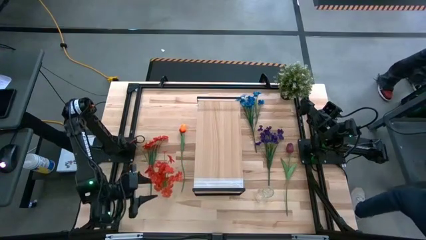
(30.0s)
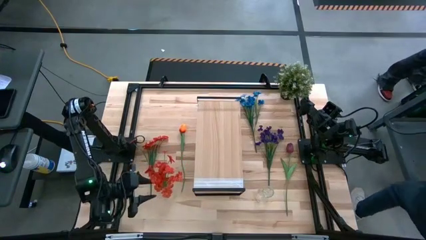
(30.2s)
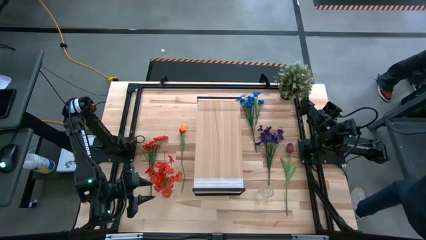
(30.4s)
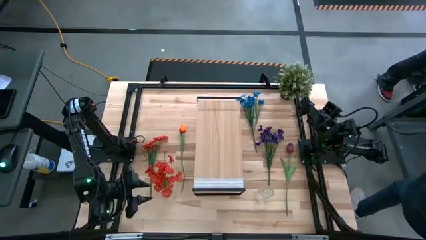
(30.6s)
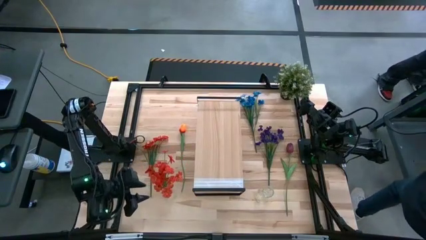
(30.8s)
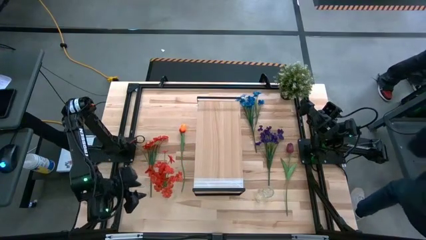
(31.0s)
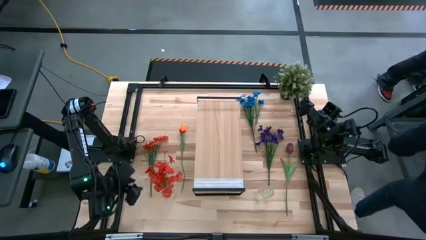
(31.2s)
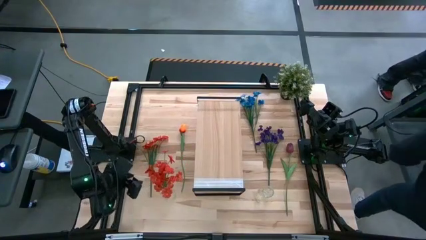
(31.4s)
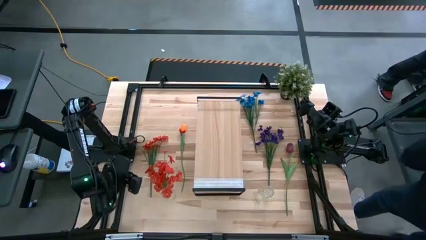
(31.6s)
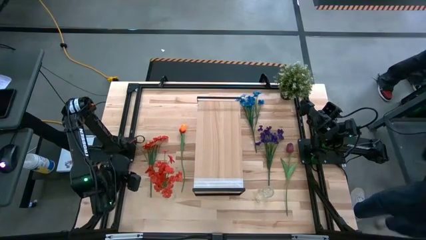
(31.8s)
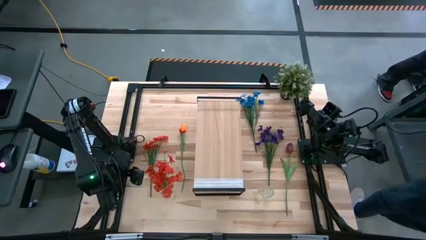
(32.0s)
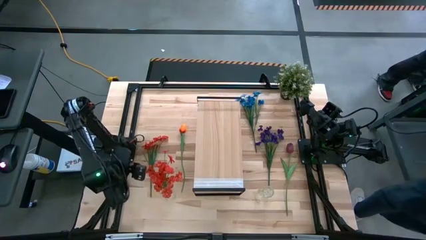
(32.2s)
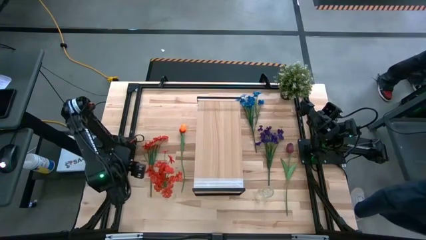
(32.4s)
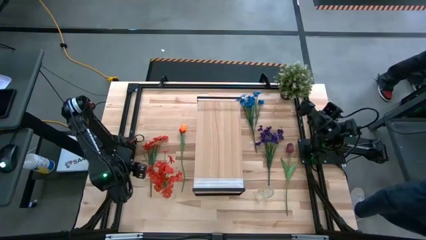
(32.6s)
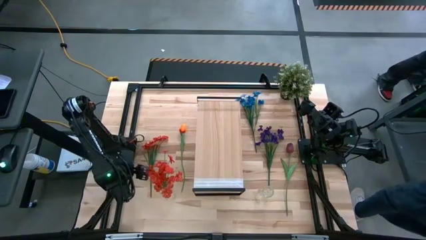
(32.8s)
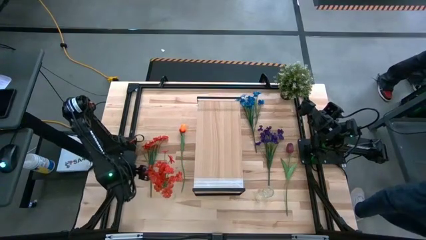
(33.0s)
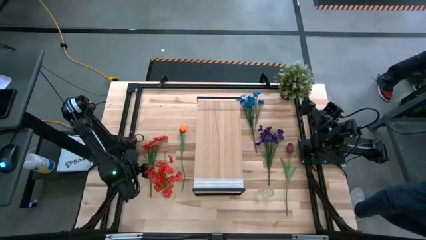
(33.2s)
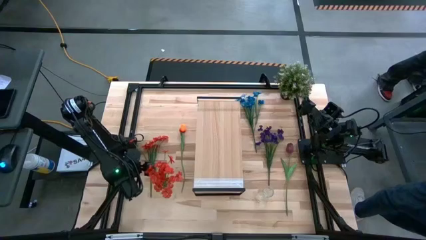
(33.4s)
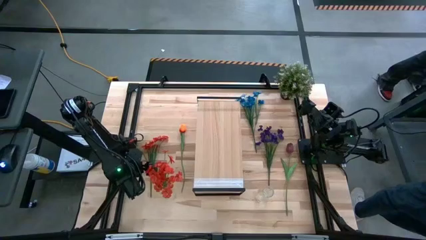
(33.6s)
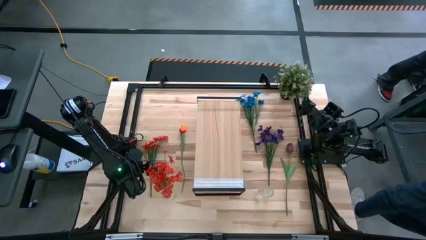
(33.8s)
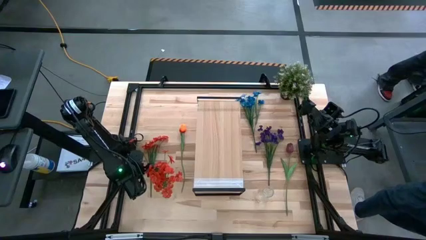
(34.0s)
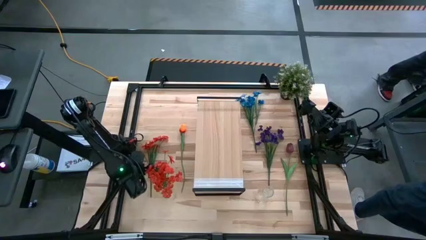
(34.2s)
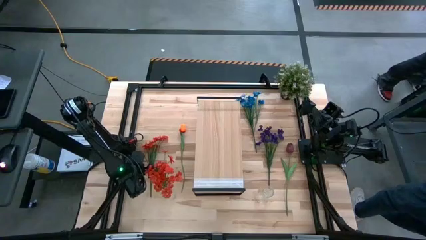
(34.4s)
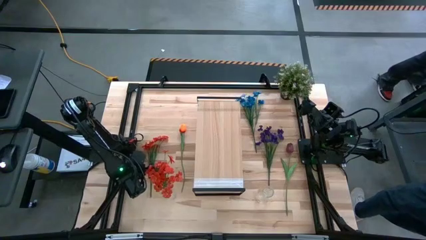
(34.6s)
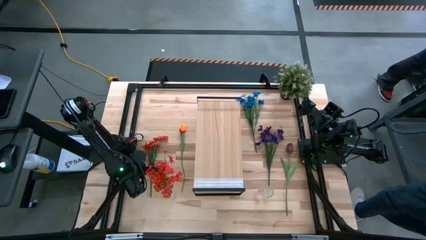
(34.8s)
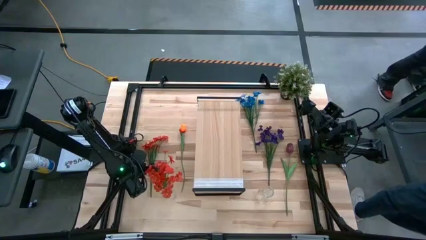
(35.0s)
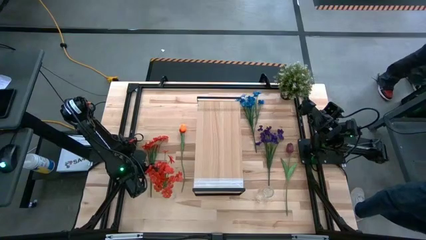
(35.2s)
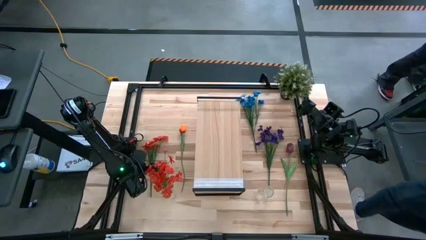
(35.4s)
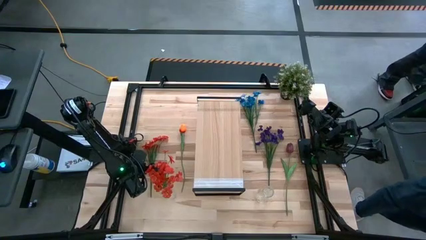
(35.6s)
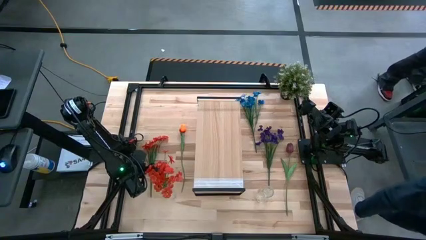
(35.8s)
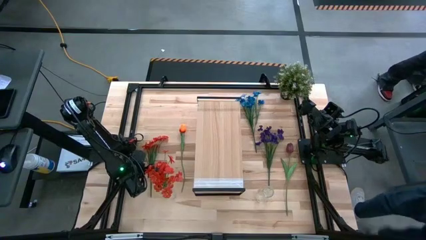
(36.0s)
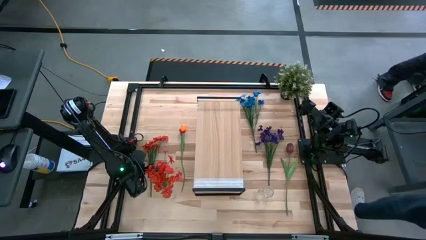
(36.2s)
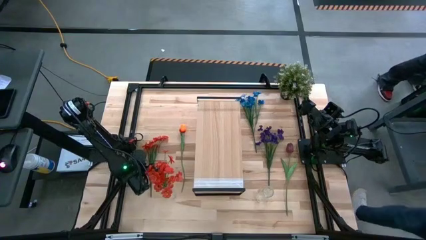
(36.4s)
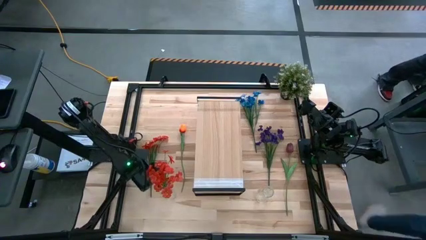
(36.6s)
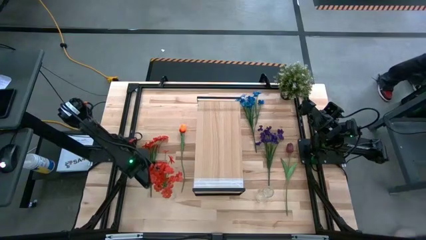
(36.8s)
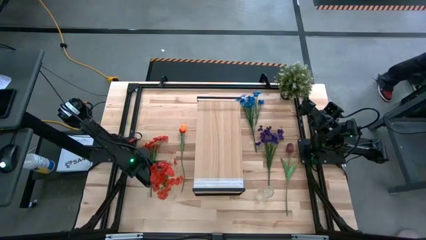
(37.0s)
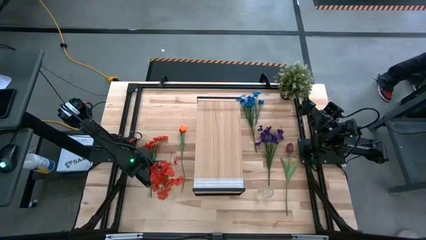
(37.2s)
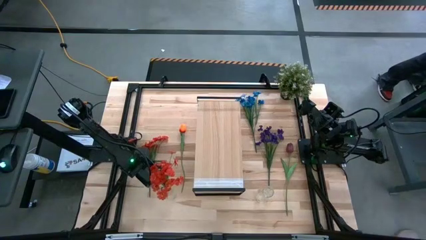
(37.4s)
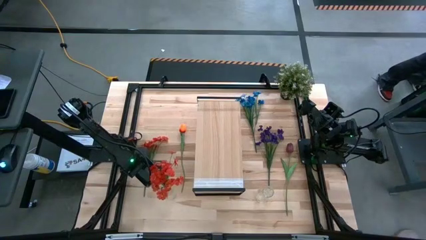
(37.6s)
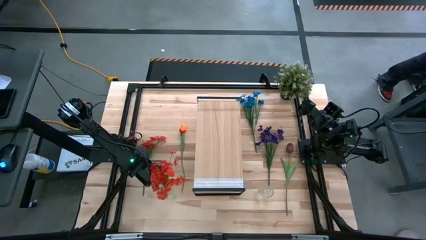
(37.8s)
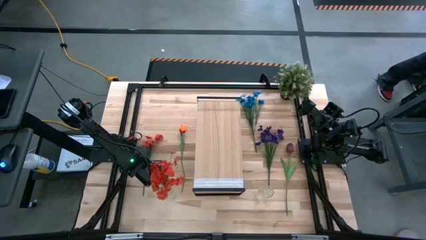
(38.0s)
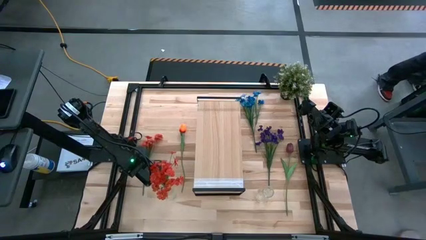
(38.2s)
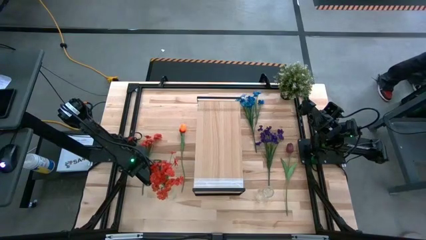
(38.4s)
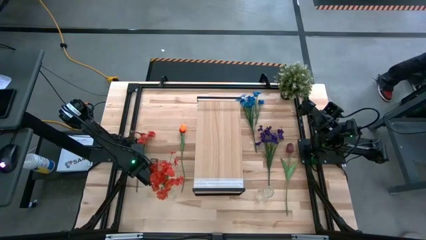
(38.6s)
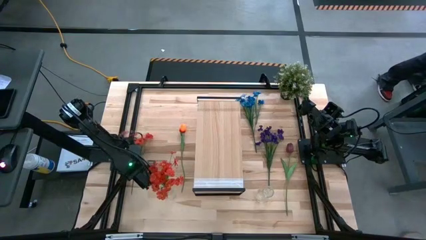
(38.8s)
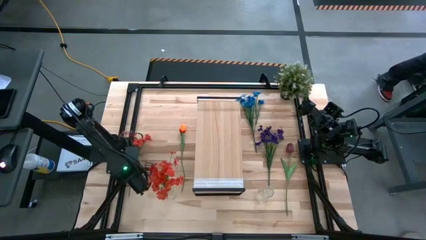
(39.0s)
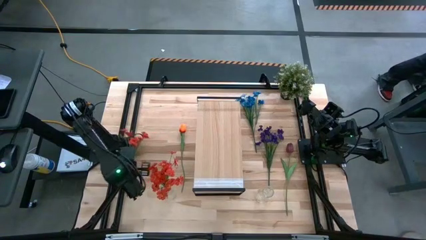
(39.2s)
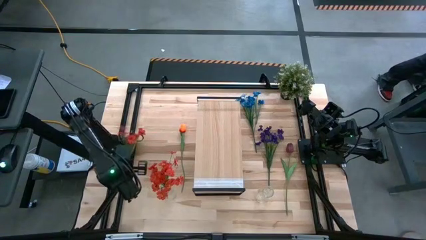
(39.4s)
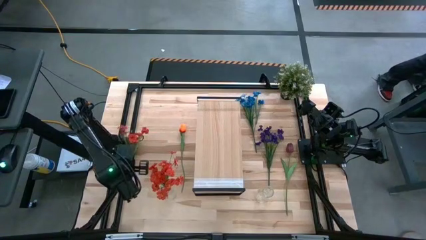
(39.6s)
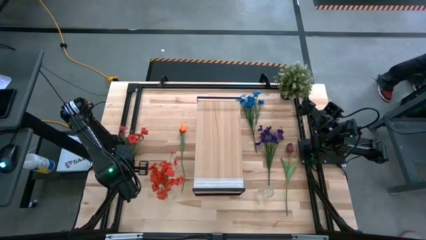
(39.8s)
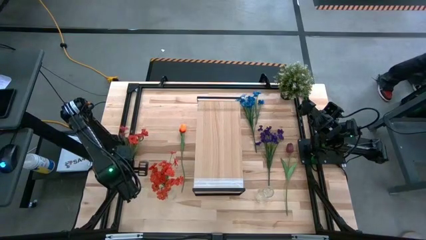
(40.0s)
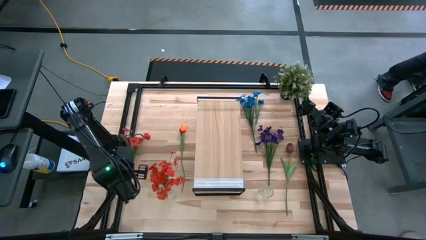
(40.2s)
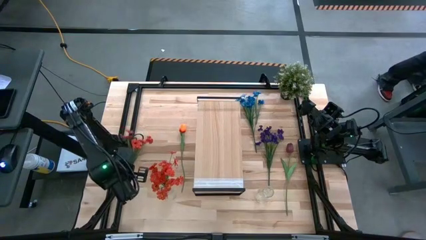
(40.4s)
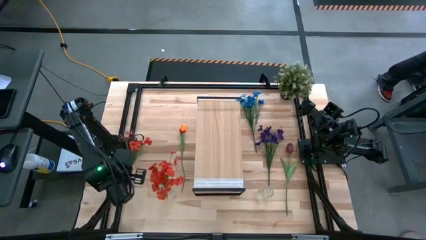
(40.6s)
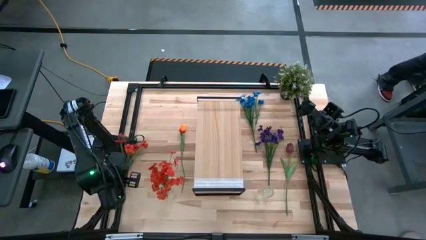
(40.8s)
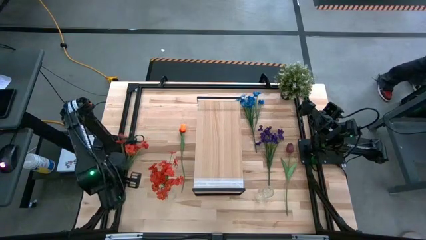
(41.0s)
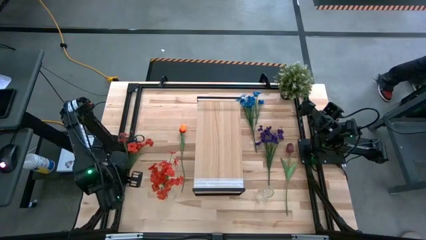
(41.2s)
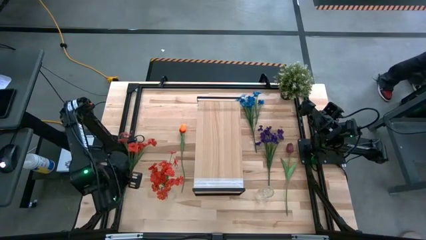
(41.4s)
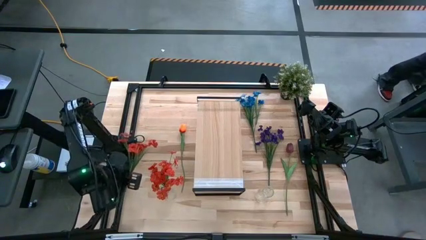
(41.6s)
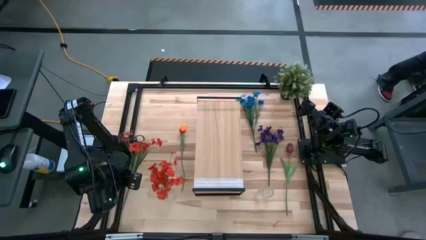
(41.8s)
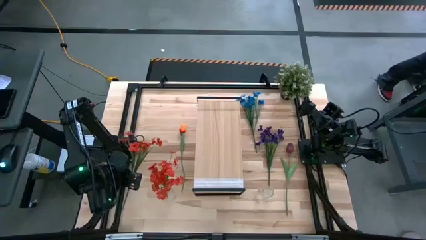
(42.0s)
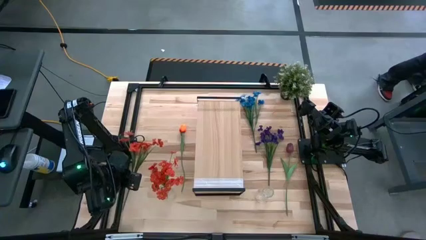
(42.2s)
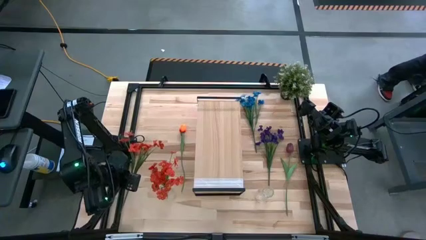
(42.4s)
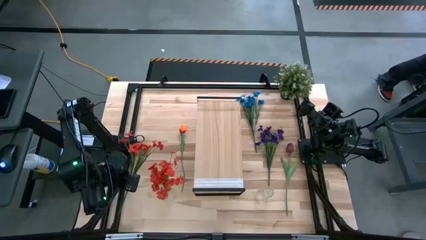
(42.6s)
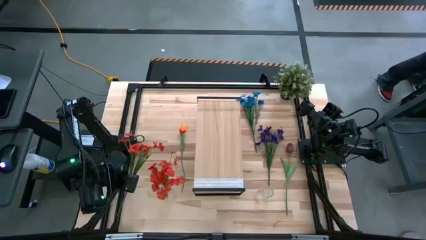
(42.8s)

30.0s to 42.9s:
Task: Pick and place flowers into a vace then onto a shelf
Put the orange flowers into the left transparent vase

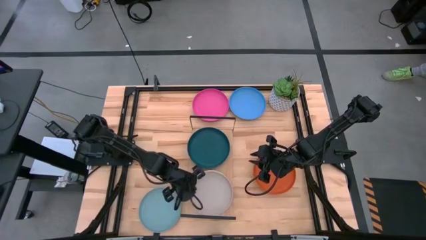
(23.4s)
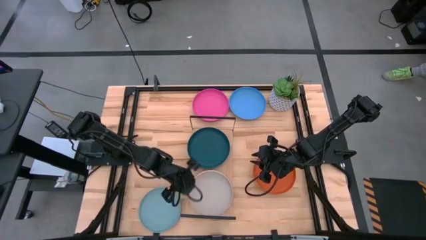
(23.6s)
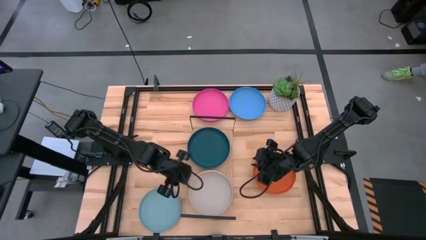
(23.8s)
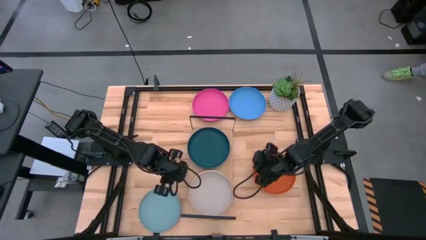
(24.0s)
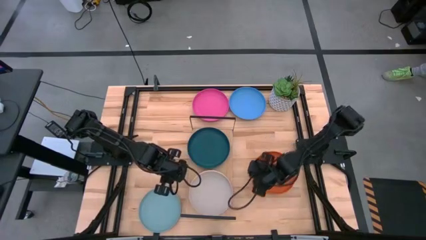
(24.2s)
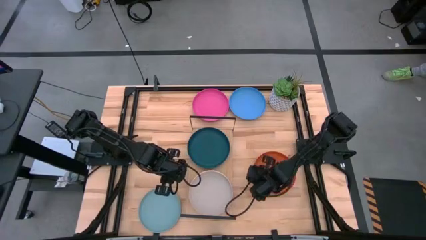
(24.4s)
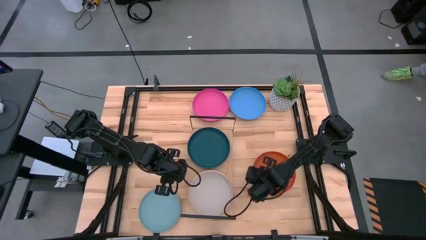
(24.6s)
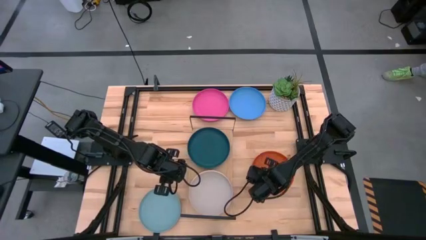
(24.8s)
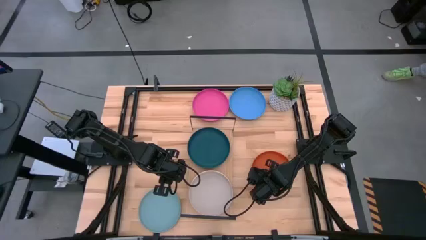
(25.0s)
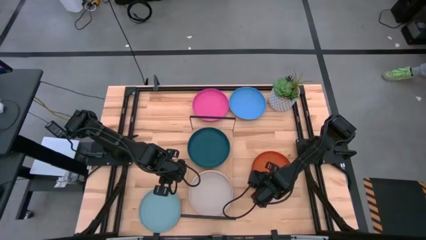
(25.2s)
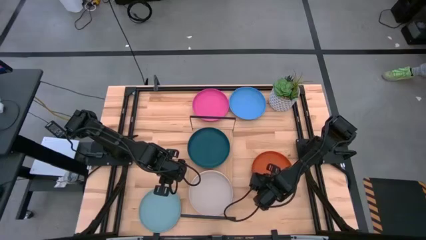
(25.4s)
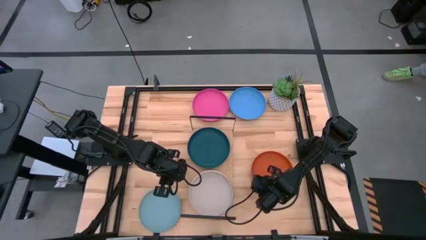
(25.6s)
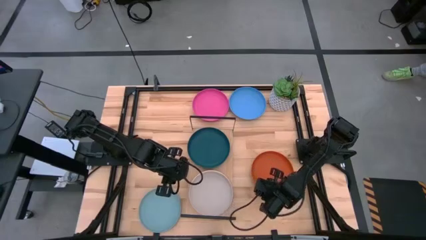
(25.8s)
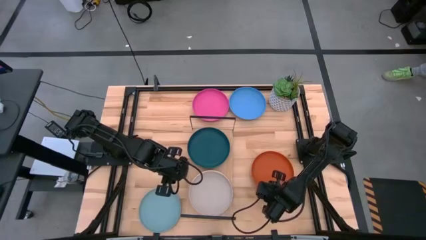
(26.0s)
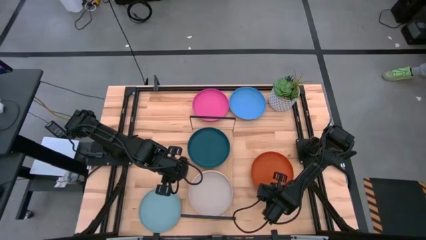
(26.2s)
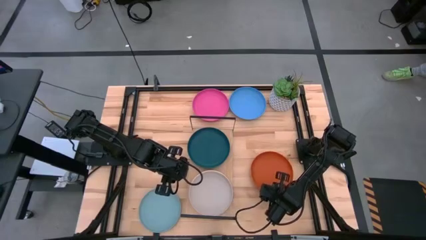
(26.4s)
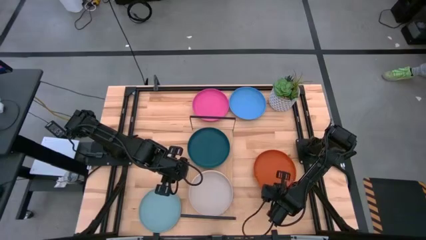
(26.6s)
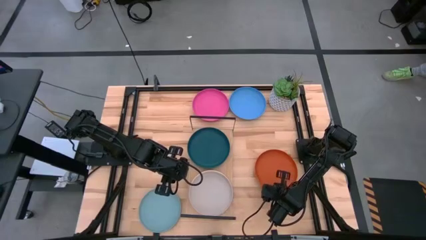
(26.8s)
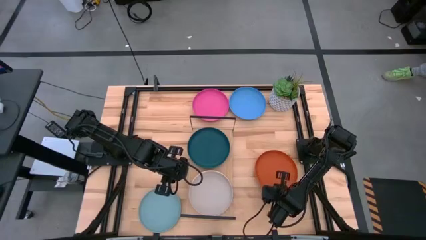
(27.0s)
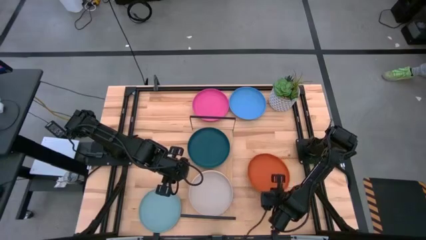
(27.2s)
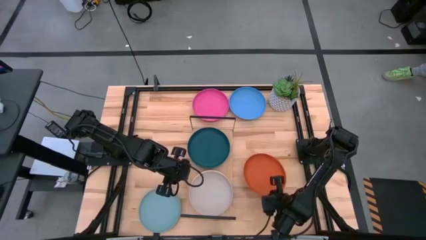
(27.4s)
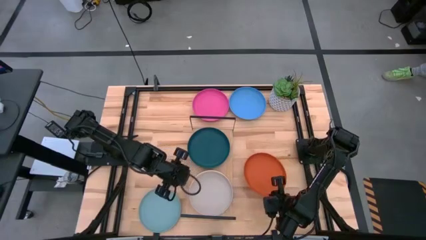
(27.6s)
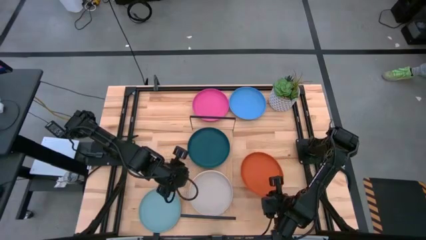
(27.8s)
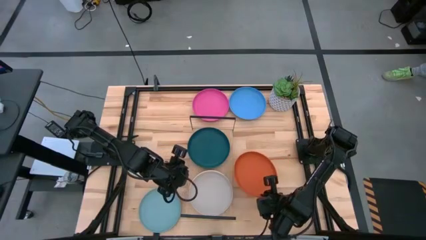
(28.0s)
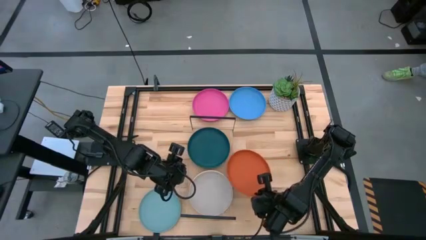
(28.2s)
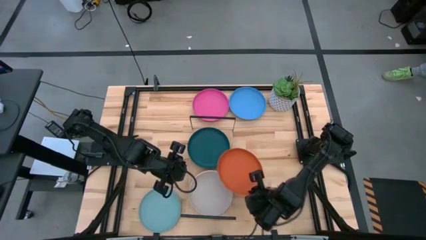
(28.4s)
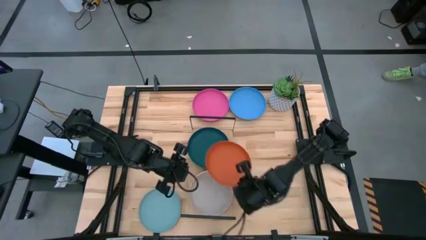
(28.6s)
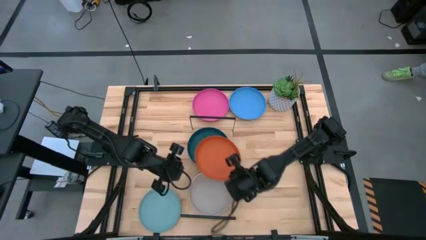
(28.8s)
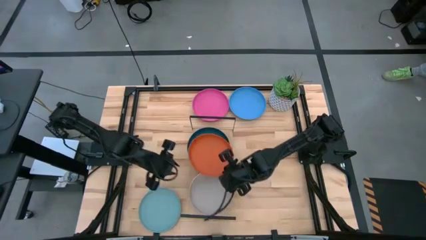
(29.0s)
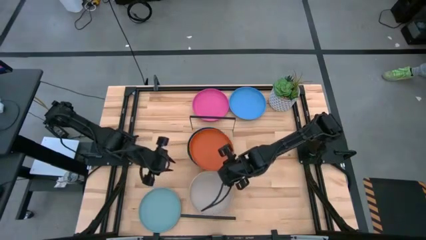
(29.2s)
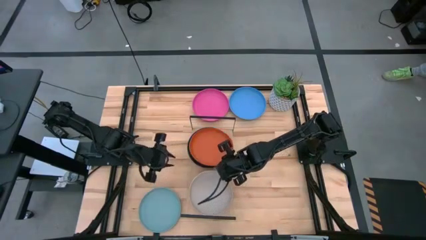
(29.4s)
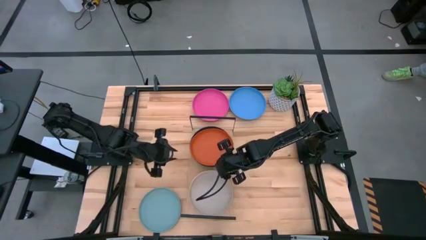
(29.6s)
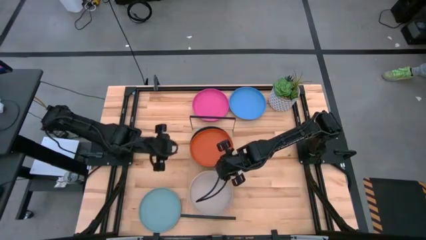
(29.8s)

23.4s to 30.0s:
Task: Place and stack plates onto a shelf
Stack the orange plate on top of the dark green plate on the shelf
